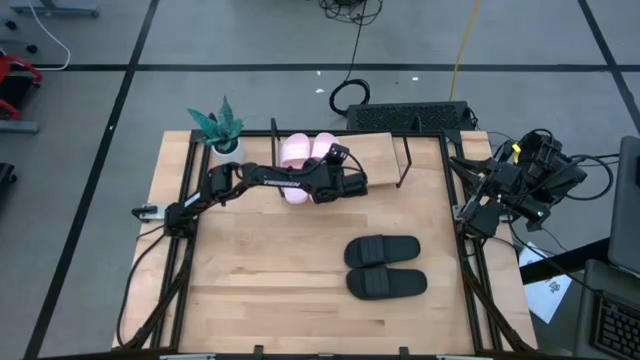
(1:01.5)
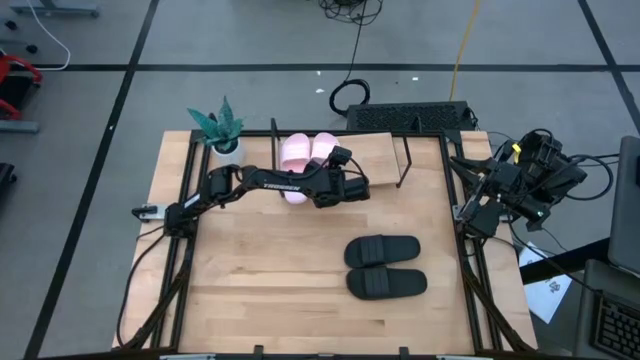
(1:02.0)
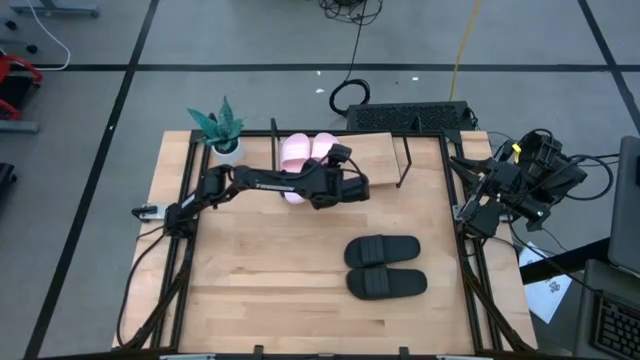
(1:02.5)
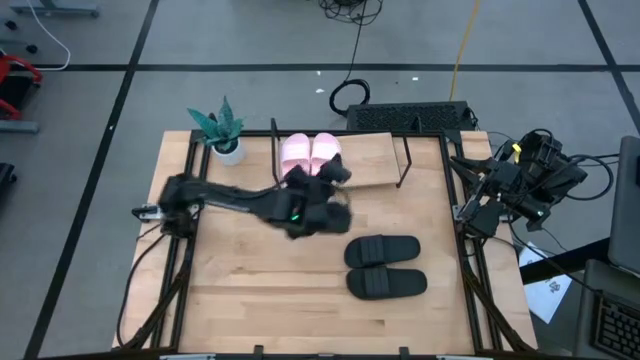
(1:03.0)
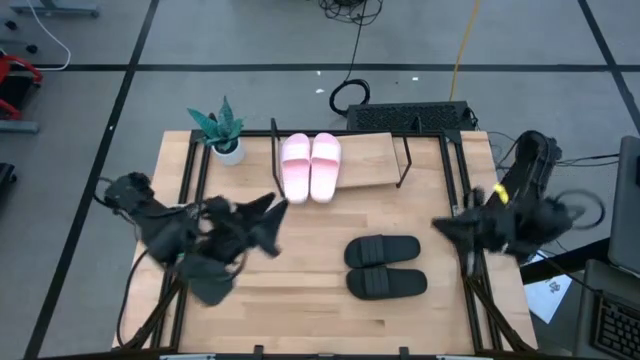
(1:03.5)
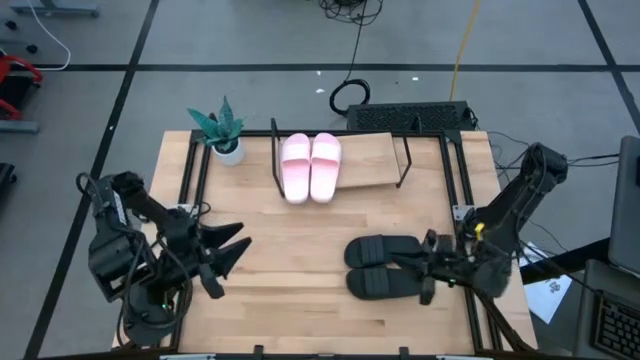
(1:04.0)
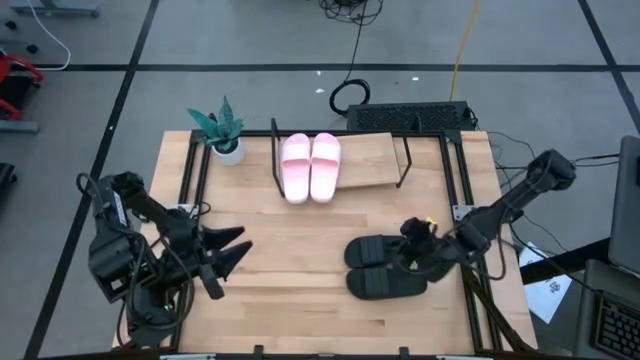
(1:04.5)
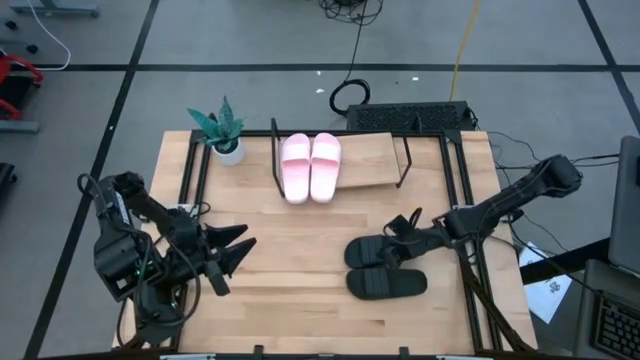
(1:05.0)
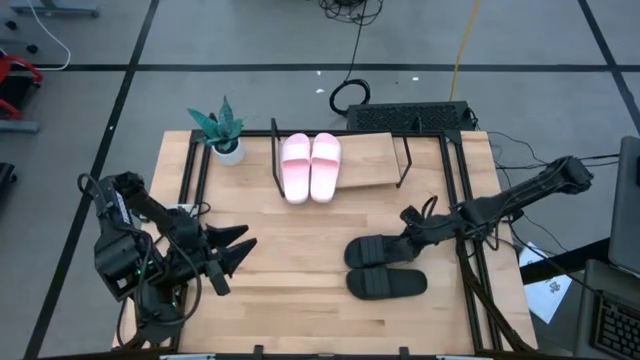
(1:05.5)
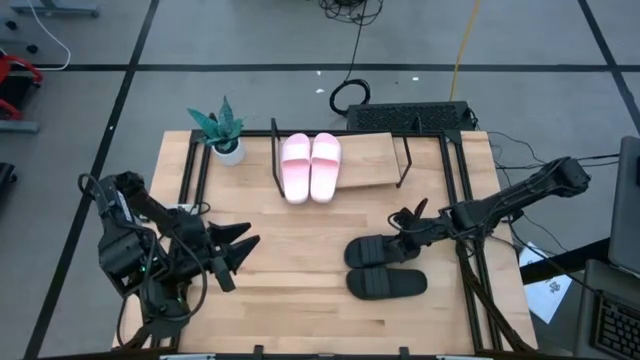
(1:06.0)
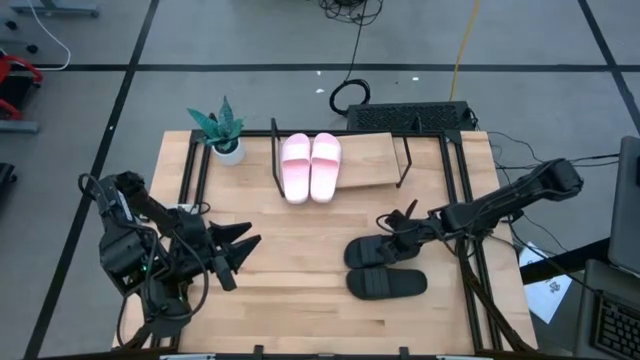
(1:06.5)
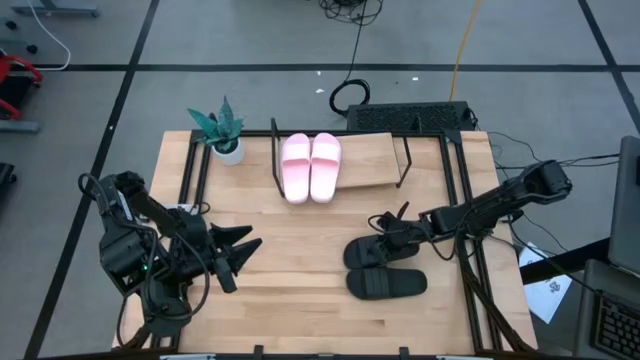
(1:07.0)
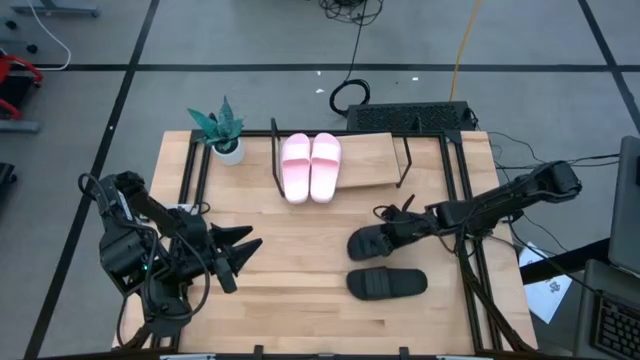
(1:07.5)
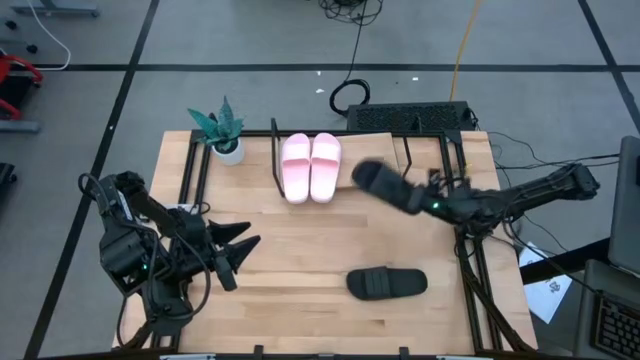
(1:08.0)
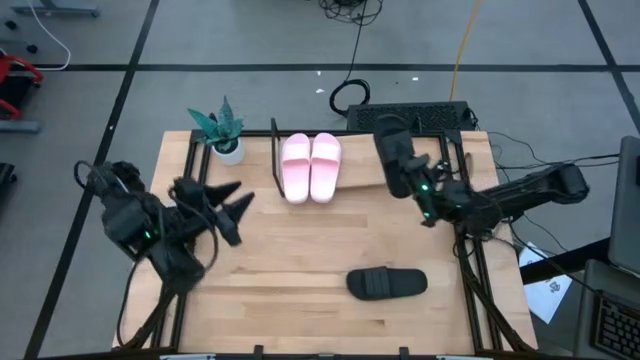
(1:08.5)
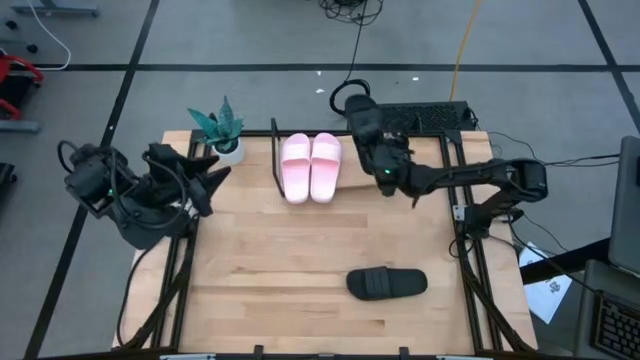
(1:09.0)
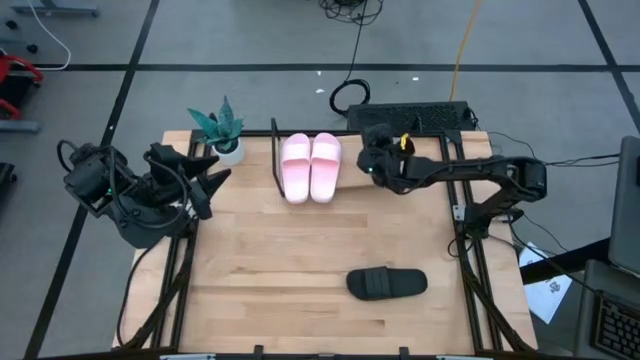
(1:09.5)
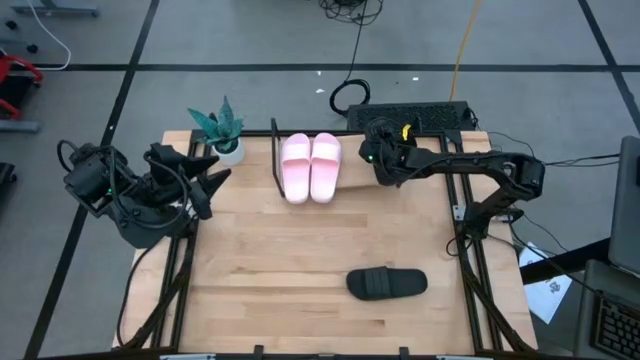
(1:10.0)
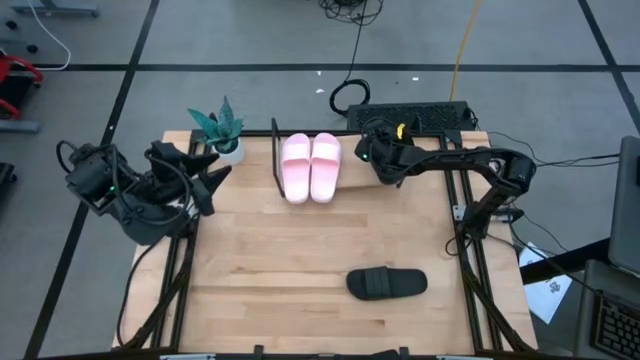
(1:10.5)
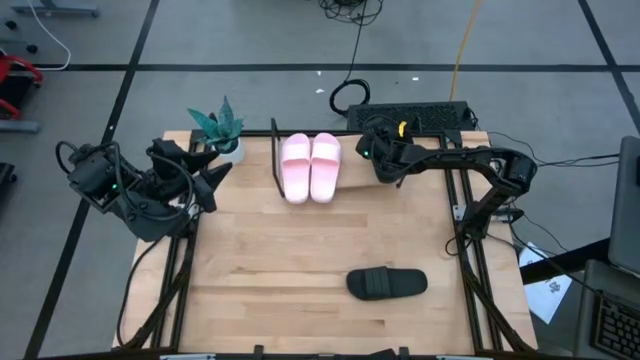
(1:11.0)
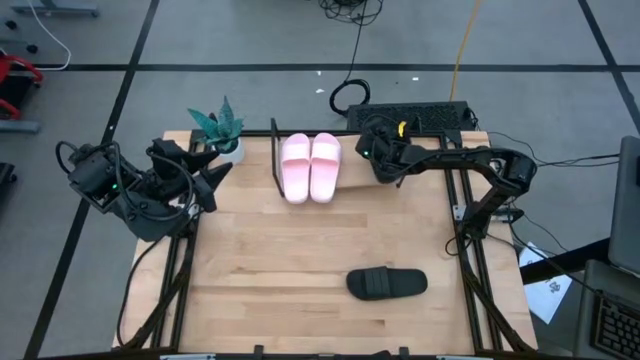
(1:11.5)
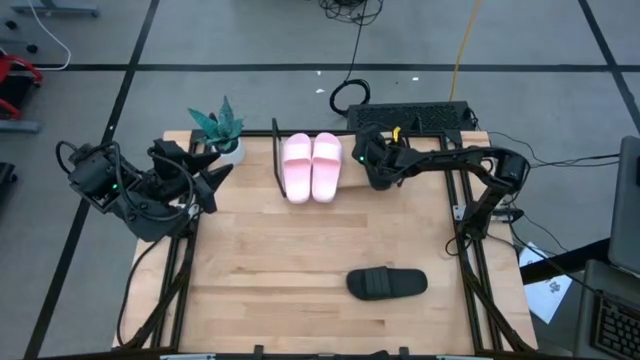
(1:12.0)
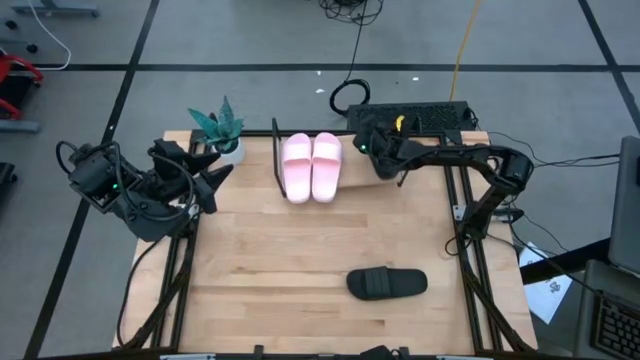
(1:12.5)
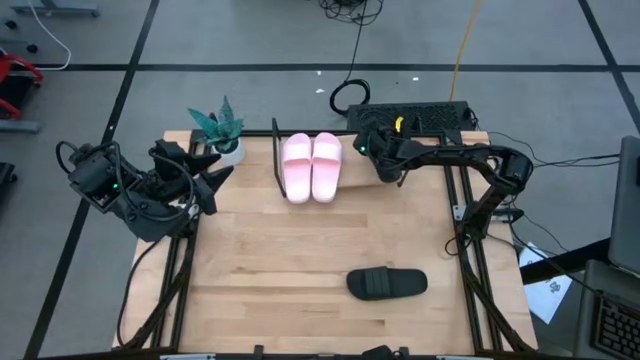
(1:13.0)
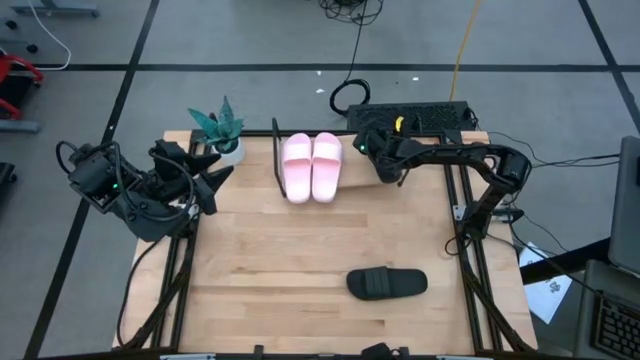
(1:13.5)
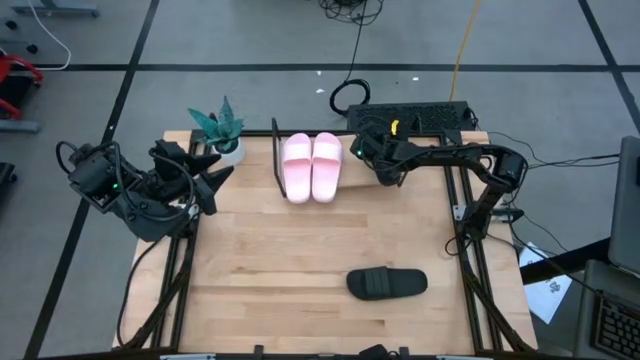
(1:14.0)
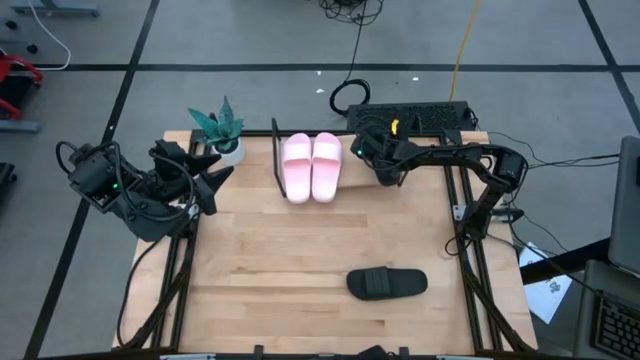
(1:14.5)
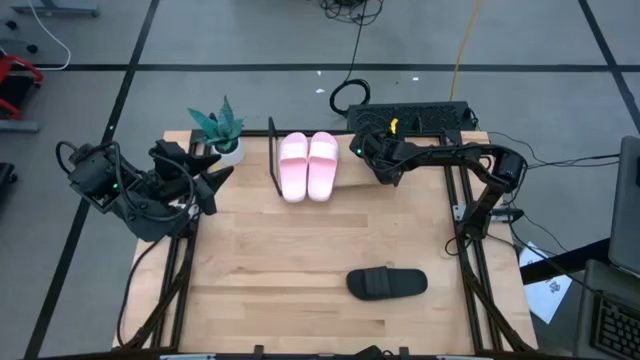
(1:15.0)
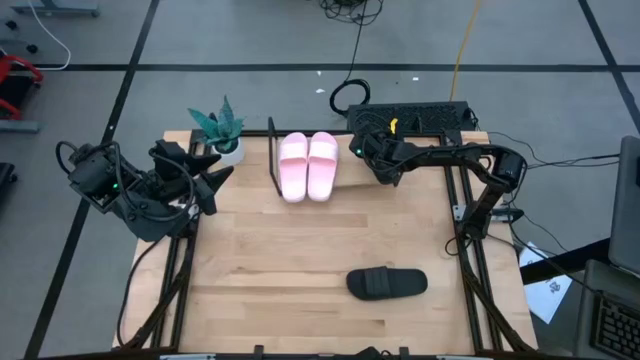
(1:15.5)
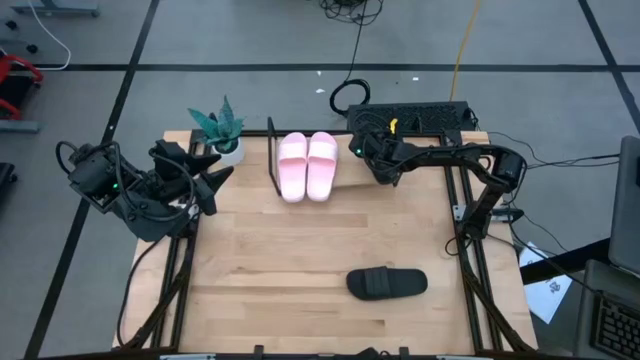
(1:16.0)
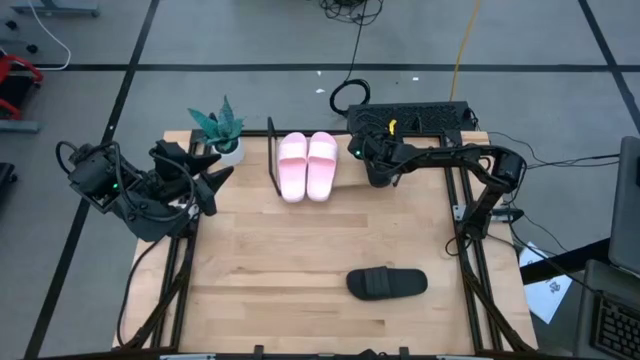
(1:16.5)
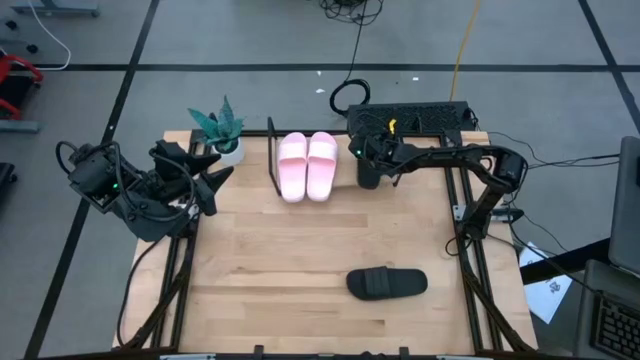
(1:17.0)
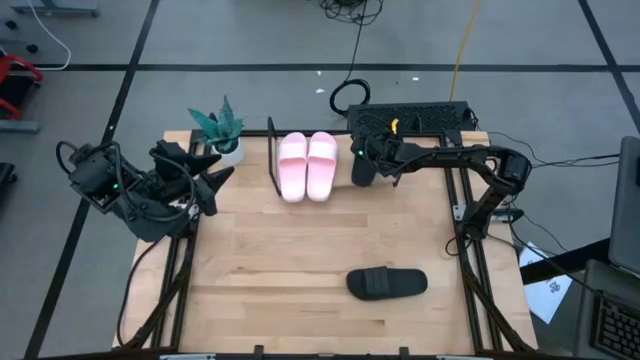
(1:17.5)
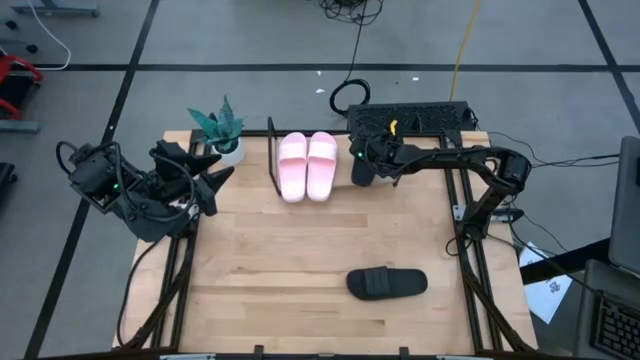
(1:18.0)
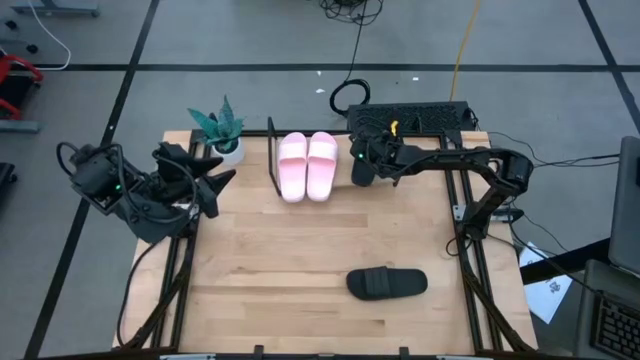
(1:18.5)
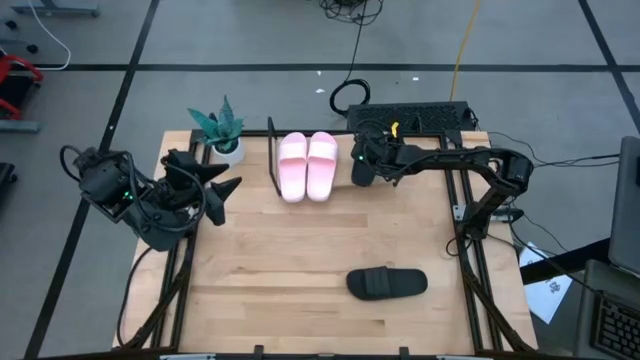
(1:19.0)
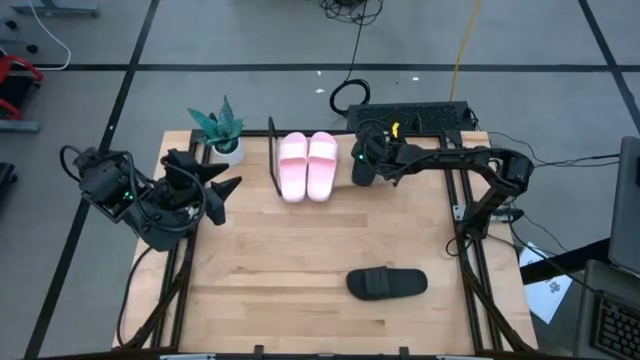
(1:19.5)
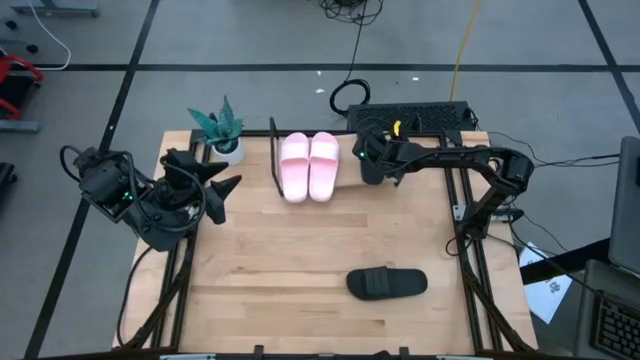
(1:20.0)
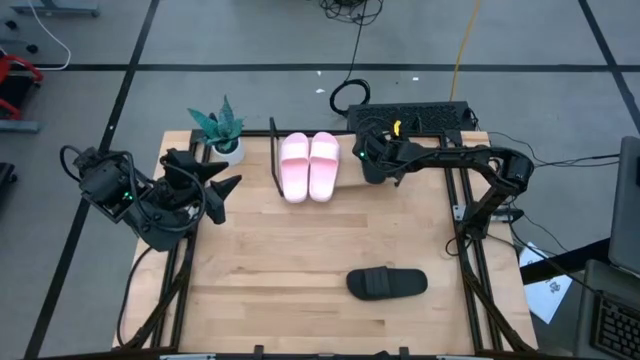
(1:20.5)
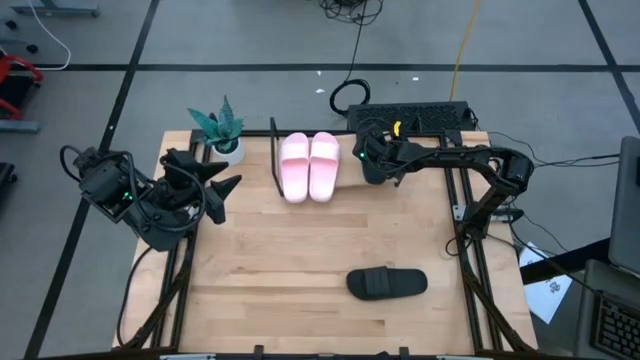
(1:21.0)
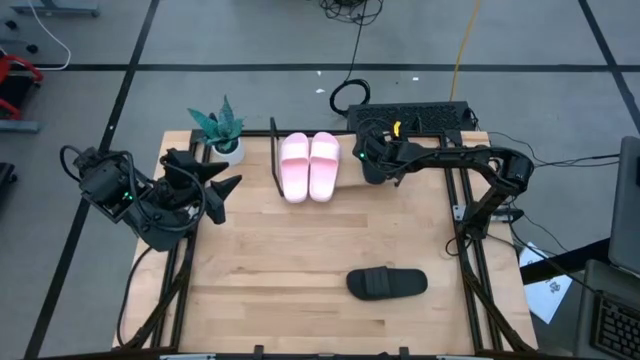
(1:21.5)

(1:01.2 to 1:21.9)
Task: Pick and place slides into the shelf
Put the top black slide on the shelf
